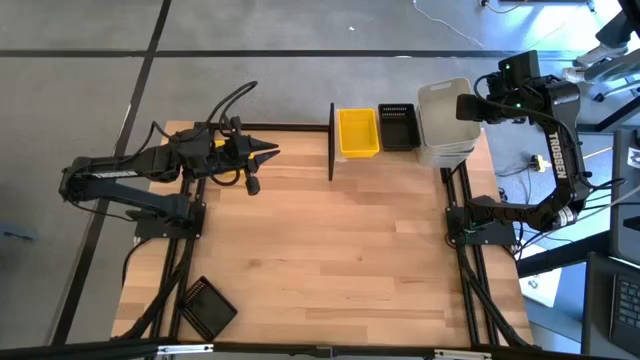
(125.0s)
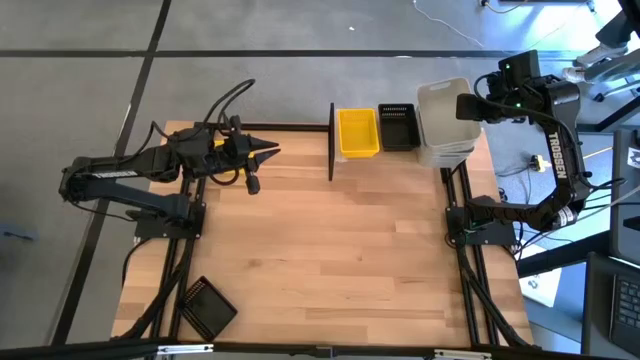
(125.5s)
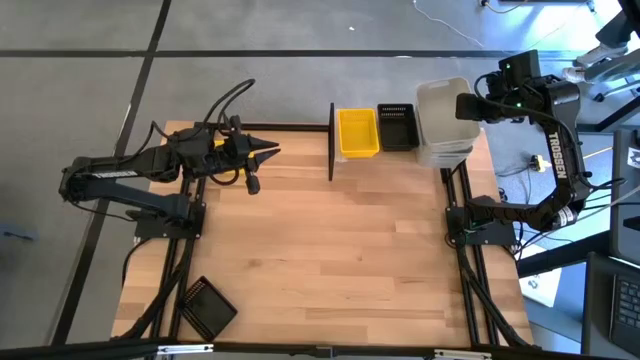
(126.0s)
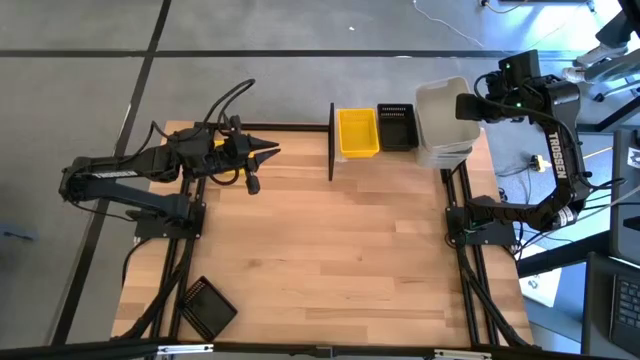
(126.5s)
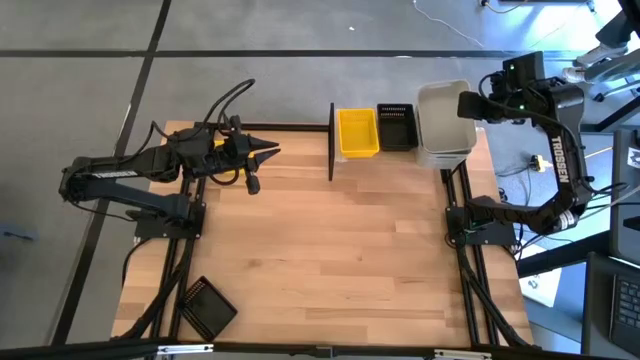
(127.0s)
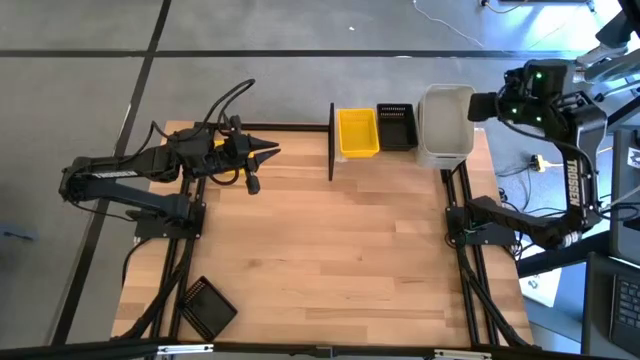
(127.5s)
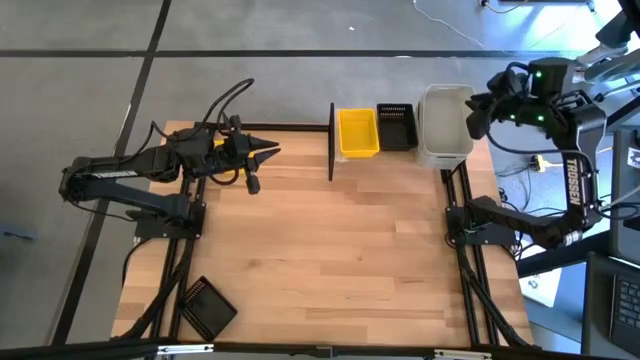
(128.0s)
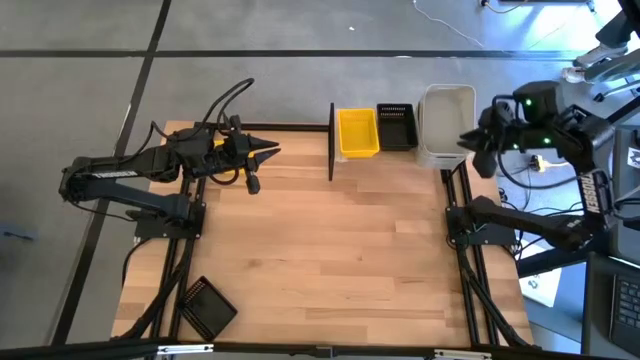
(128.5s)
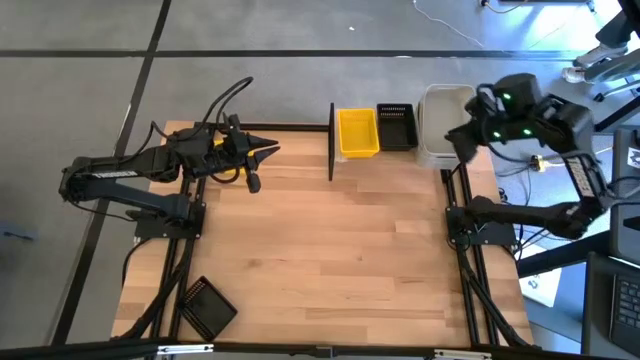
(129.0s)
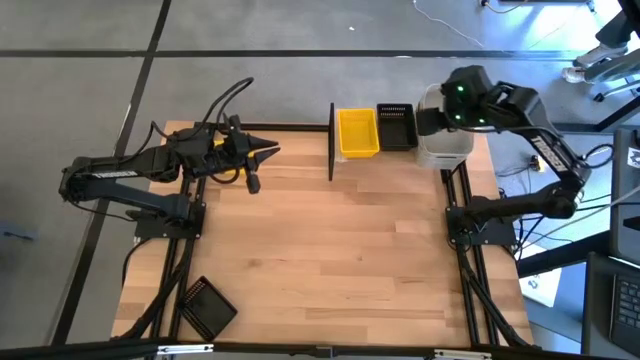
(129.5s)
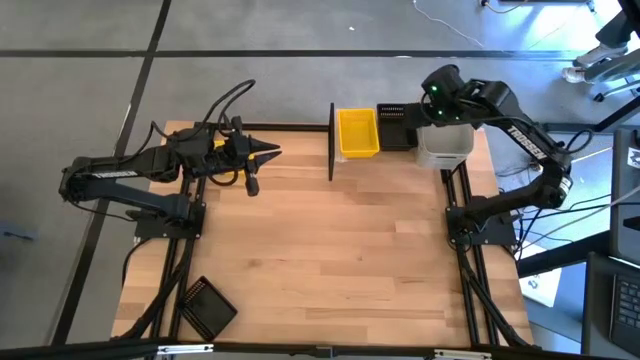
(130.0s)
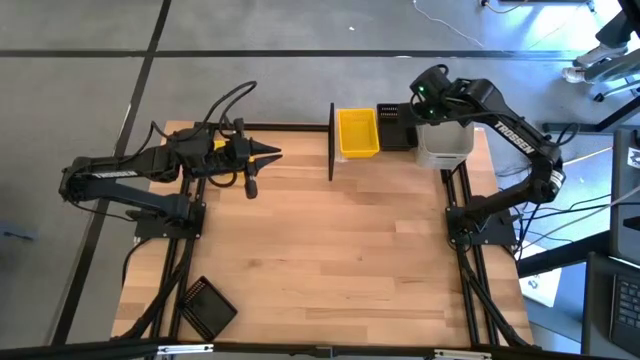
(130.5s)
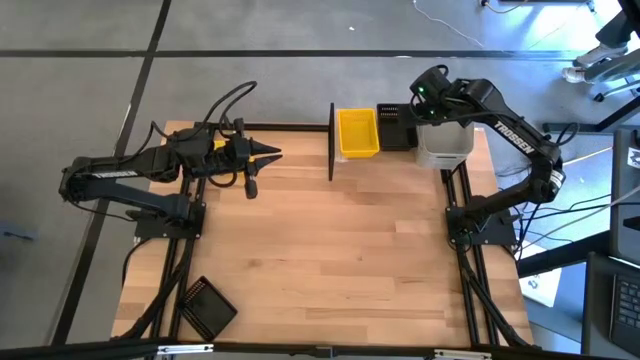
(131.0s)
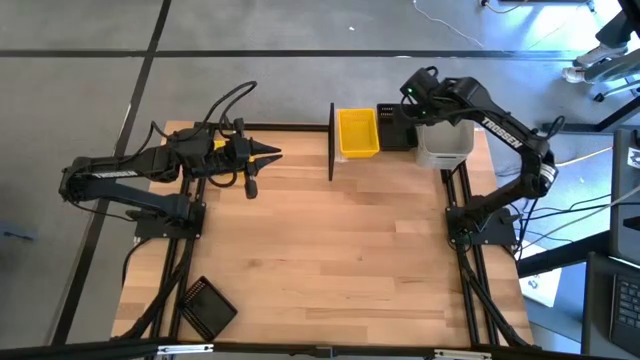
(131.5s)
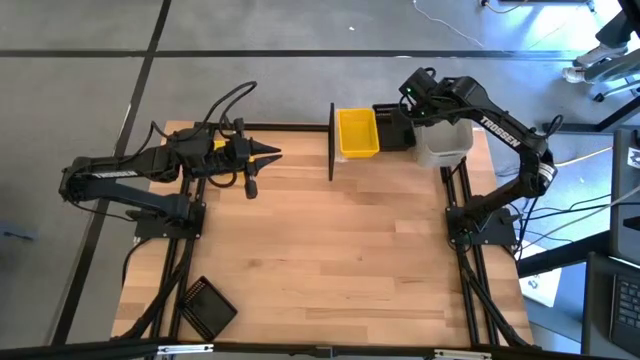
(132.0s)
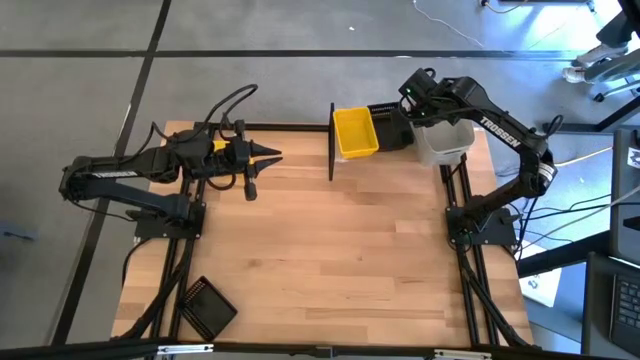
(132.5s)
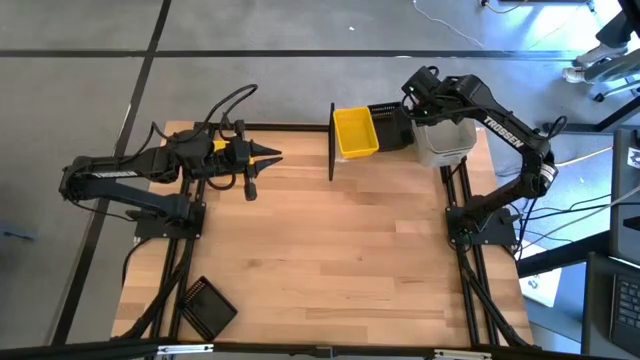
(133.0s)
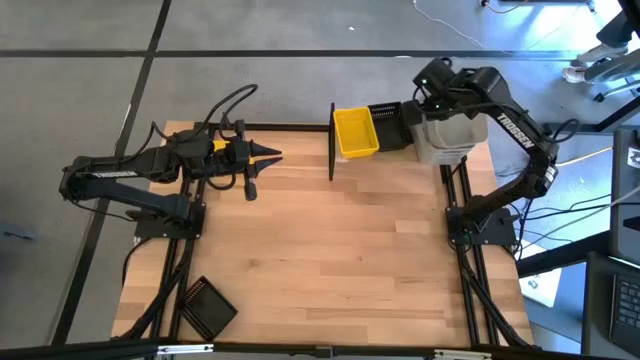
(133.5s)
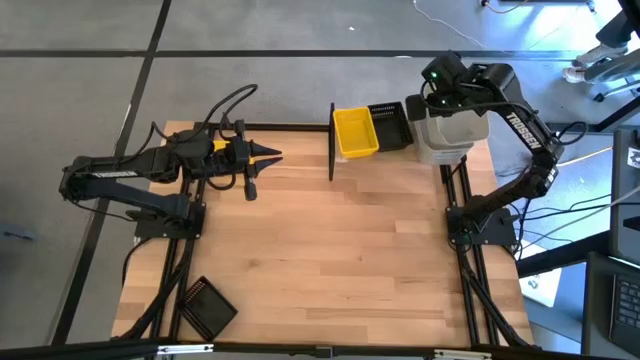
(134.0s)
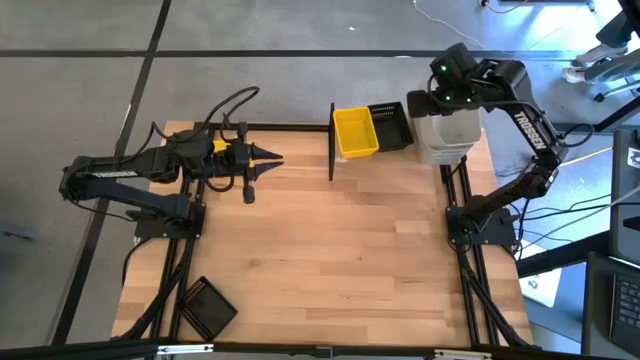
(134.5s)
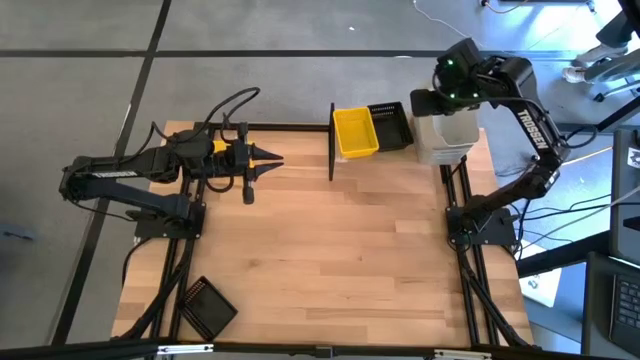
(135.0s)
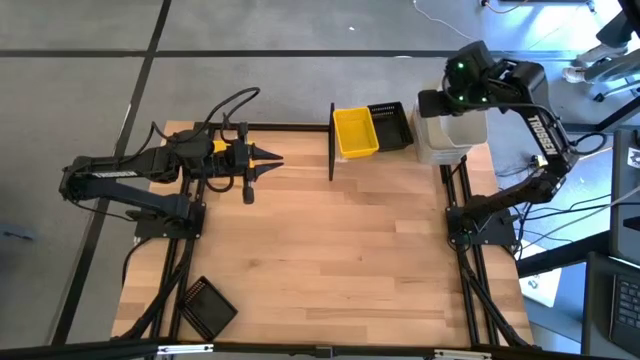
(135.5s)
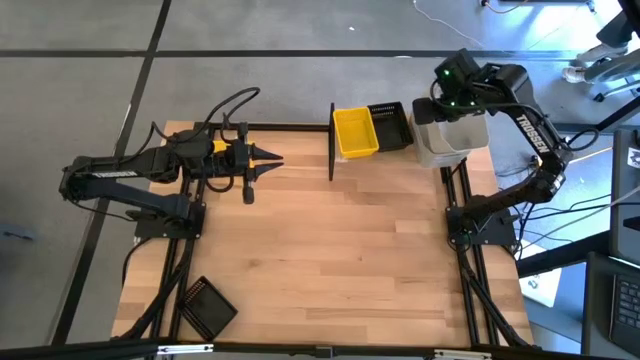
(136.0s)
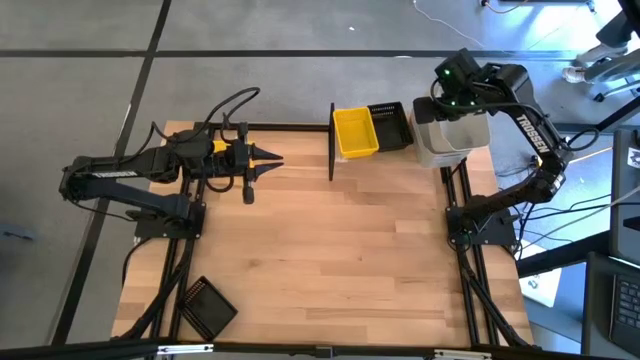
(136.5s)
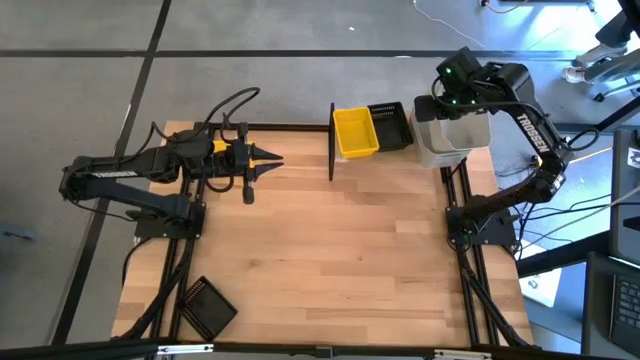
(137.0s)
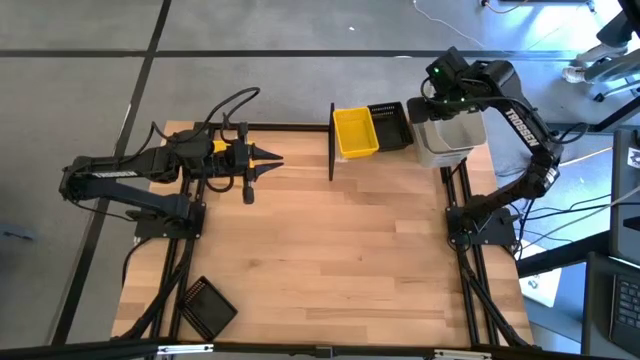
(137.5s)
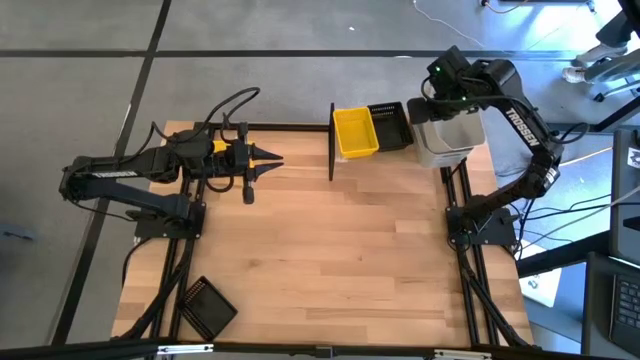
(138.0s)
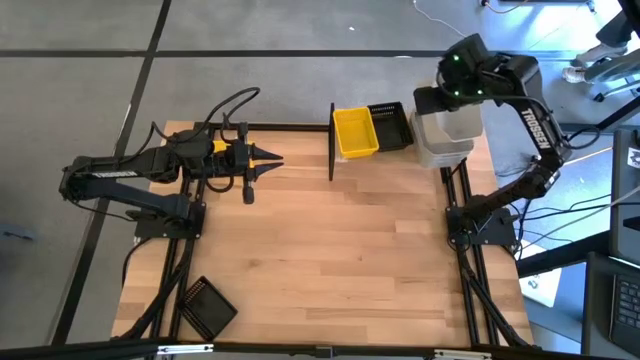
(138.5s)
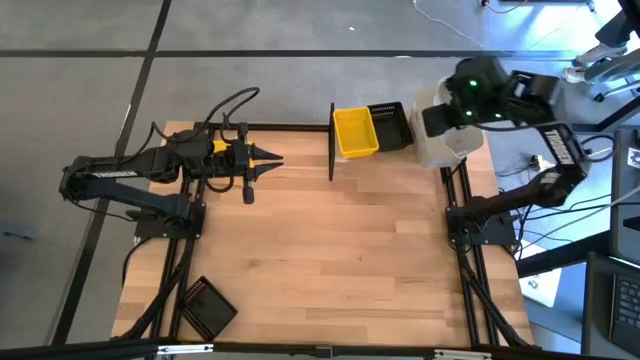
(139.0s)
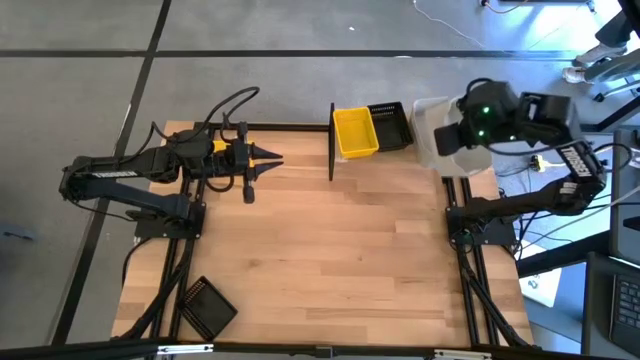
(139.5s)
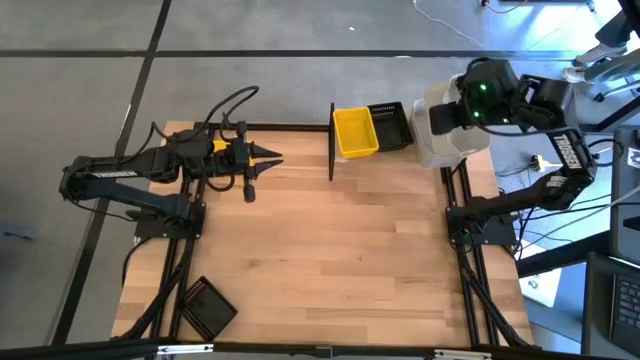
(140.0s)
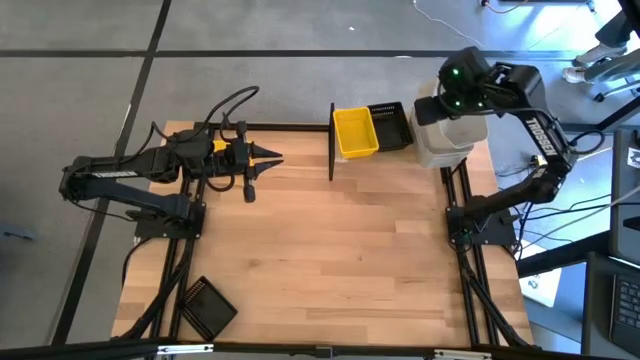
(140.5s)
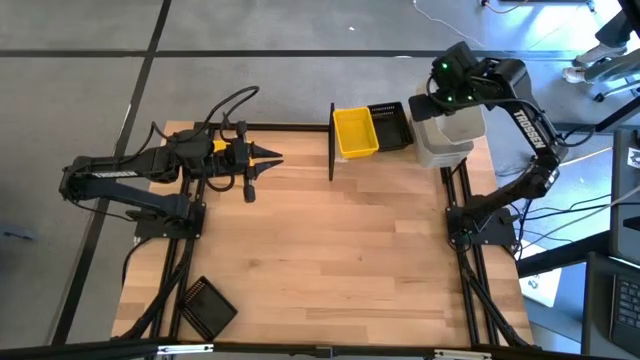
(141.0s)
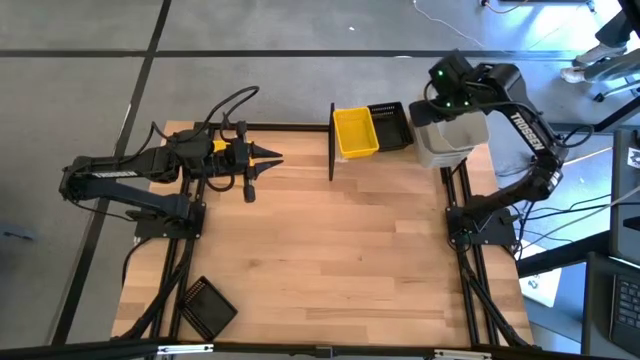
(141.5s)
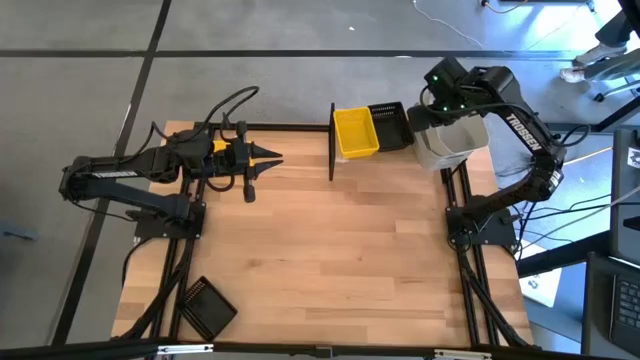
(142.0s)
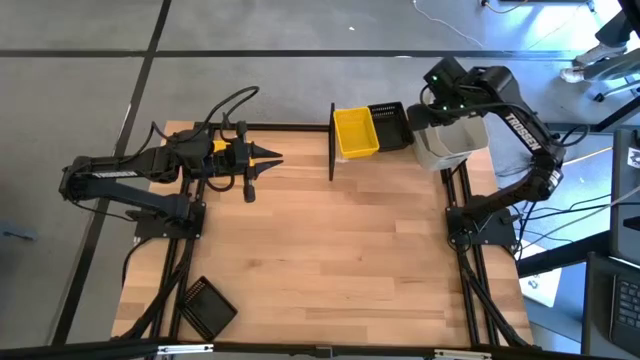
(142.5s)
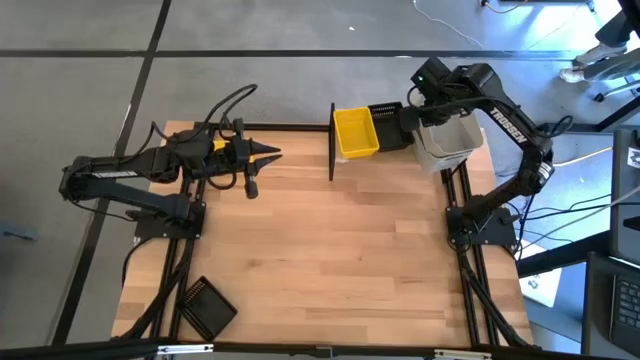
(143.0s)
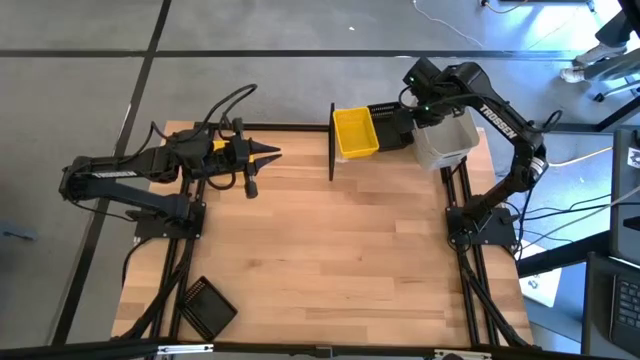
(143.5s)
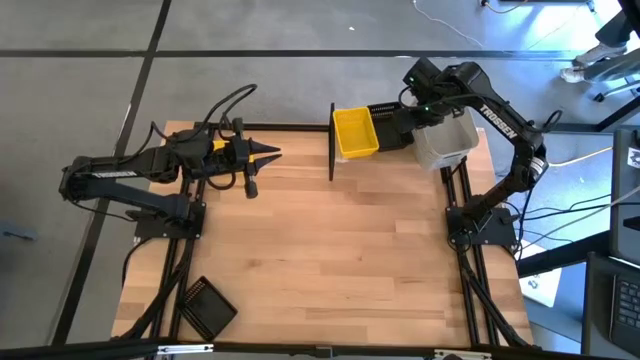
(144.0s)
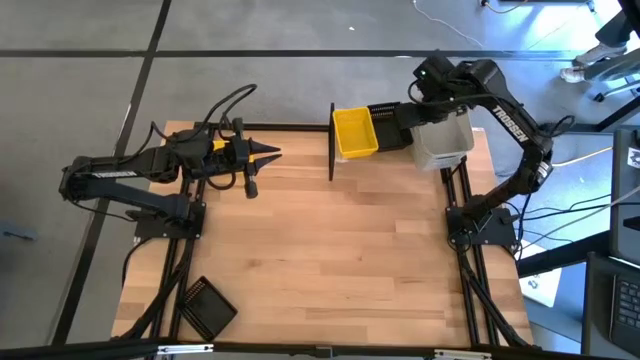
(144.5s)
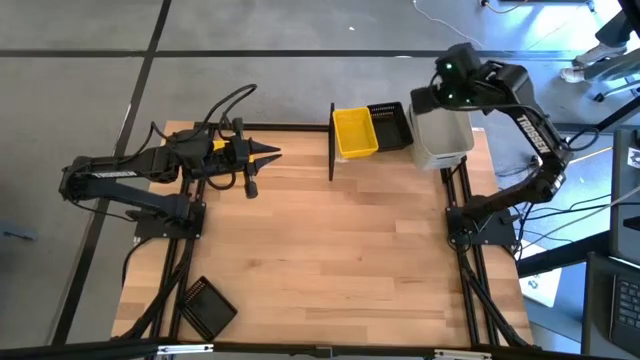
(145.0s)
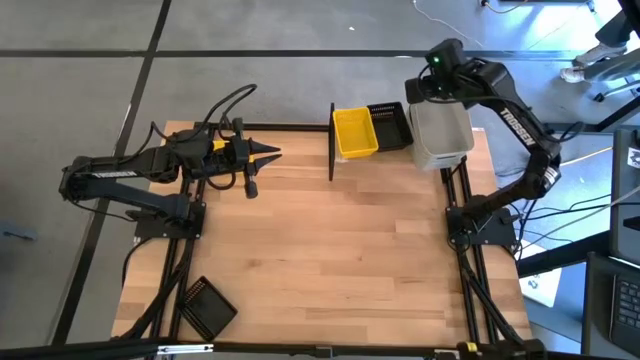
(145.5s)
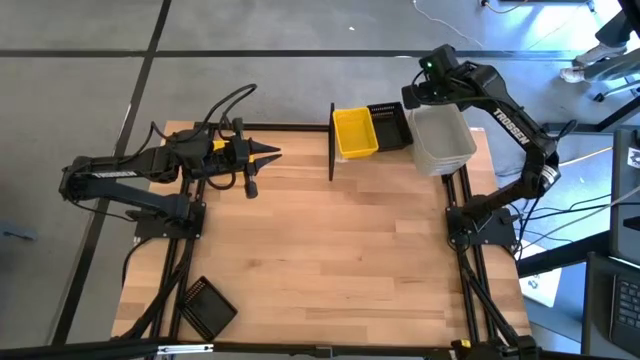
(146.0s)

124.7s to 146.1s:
Task: Stack baskets on shelf by color
Stack the white bin on top of the white bin on the shelf

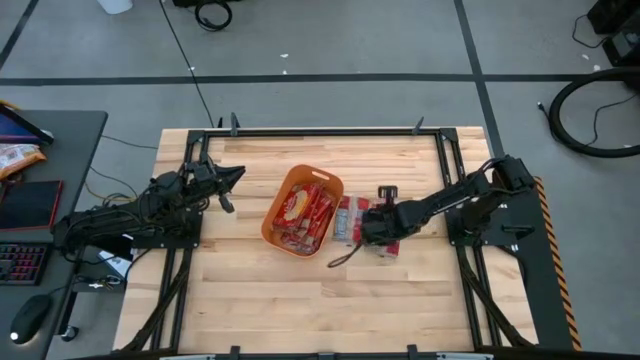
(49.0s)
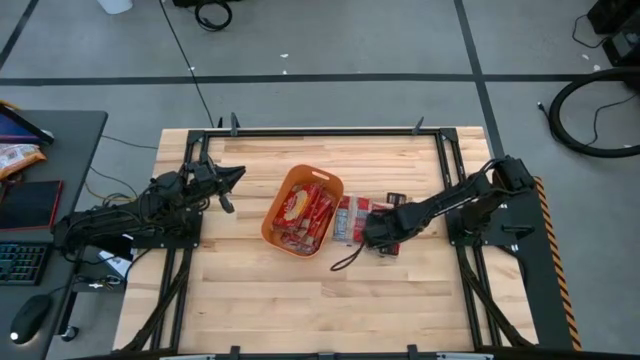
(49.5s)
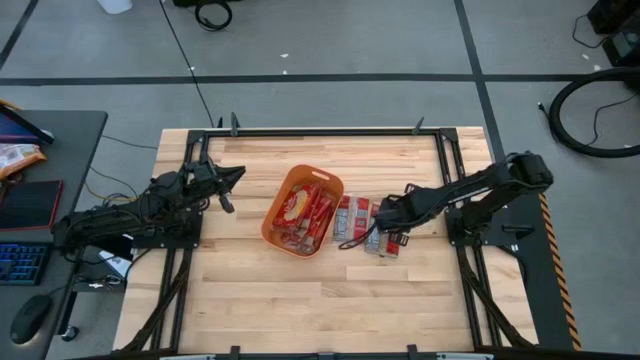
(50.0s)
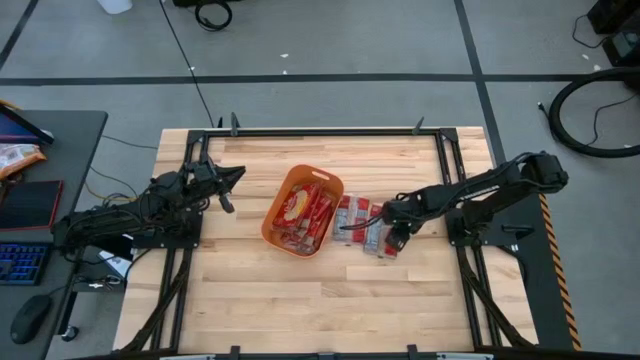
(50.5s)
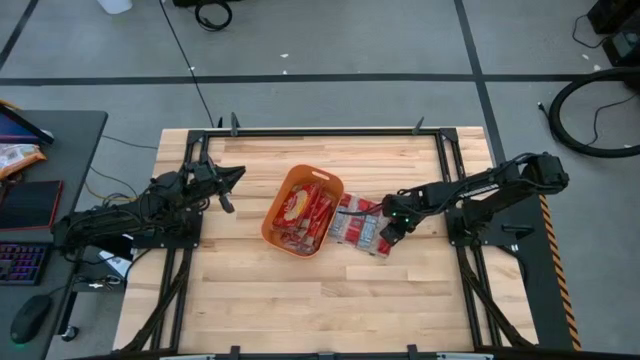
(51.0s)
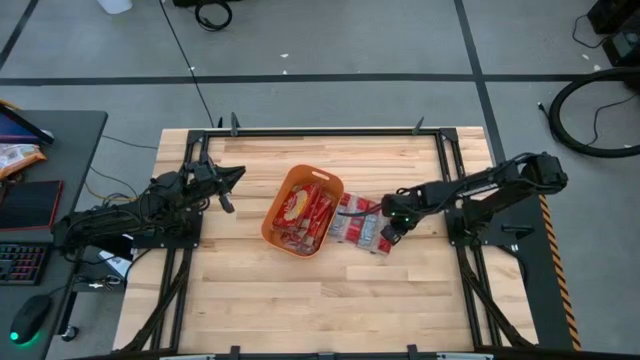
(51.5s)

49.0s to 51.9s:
Task: Sort popcorn bags into baskets
Put the red popcorn pack into the orange bin
